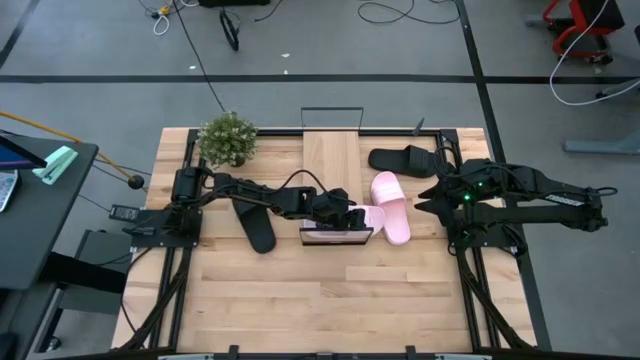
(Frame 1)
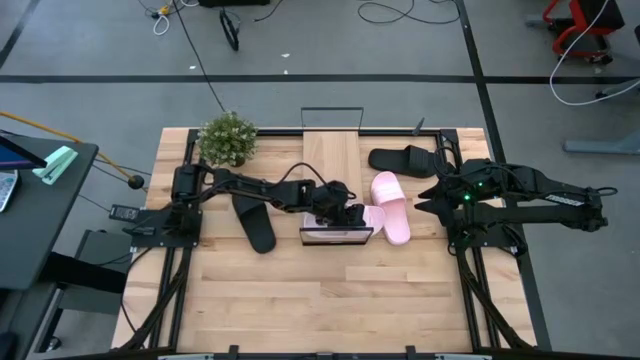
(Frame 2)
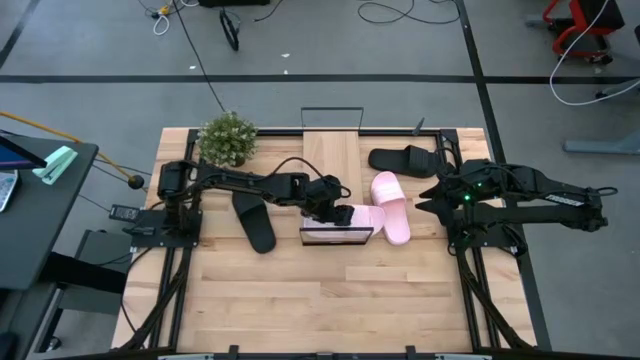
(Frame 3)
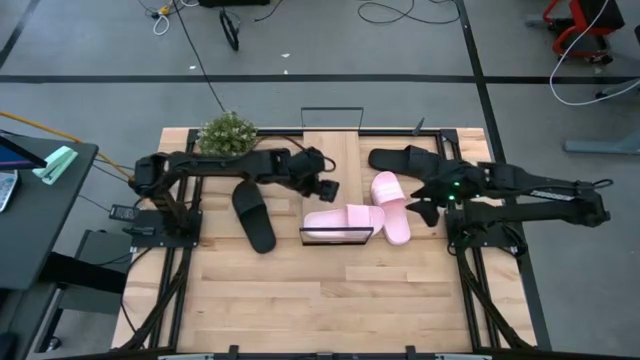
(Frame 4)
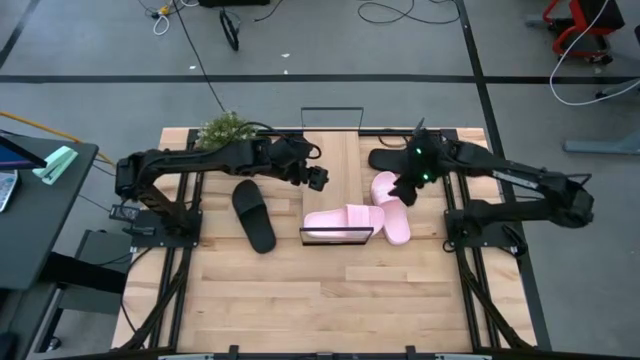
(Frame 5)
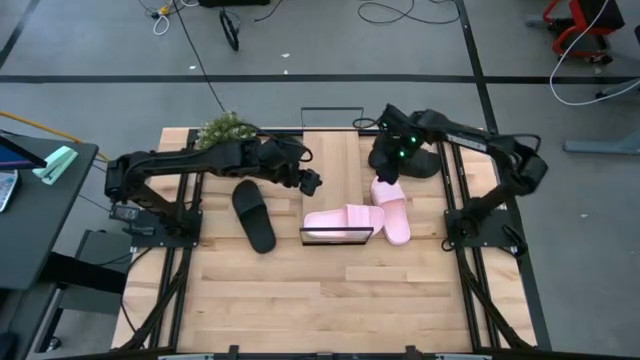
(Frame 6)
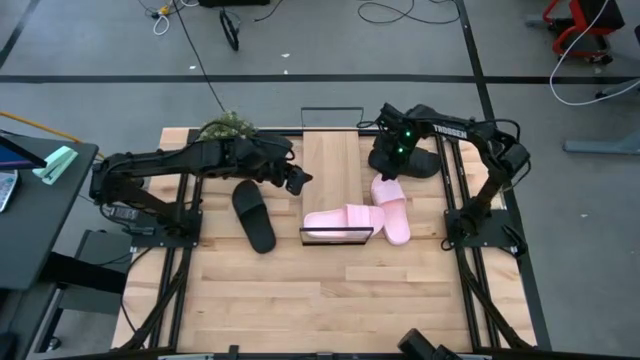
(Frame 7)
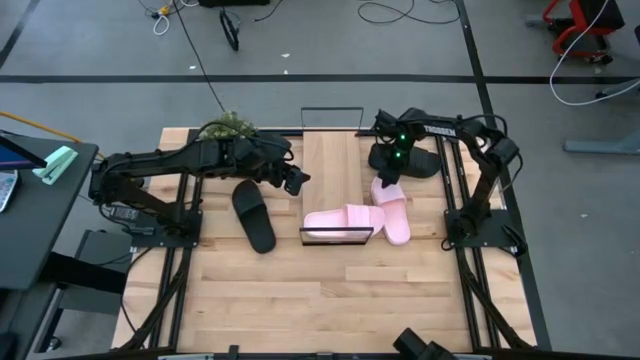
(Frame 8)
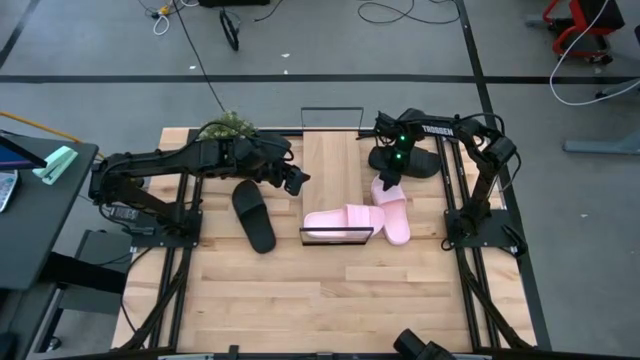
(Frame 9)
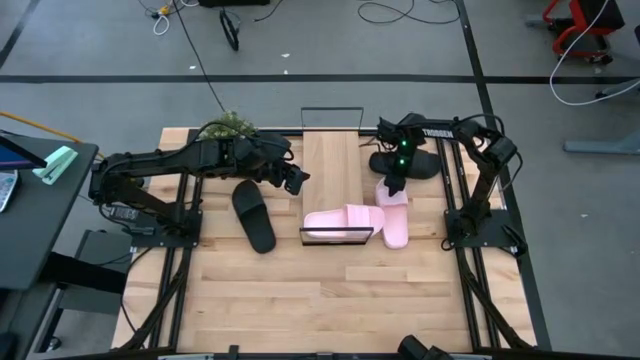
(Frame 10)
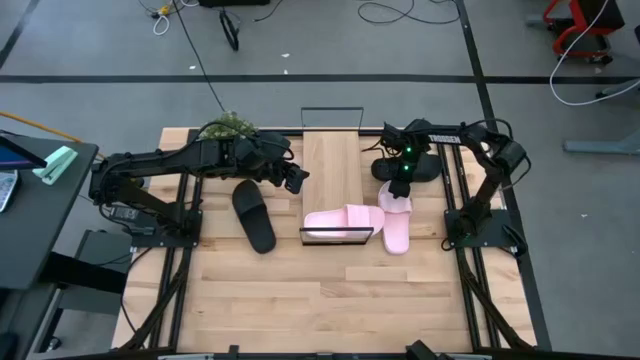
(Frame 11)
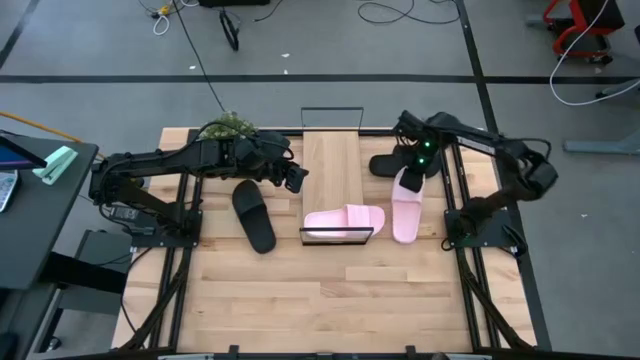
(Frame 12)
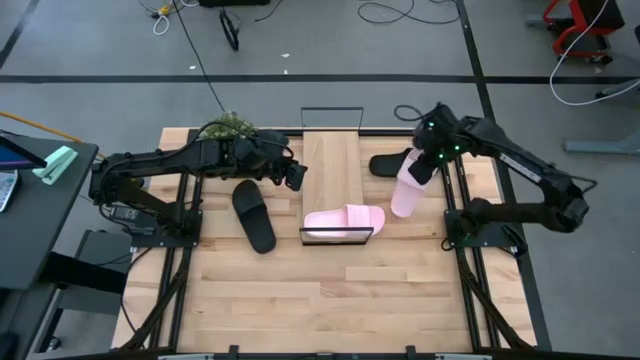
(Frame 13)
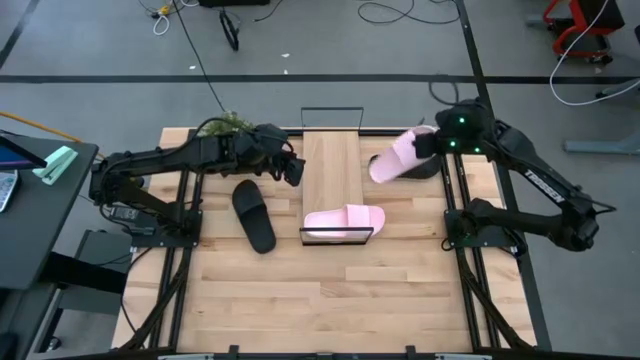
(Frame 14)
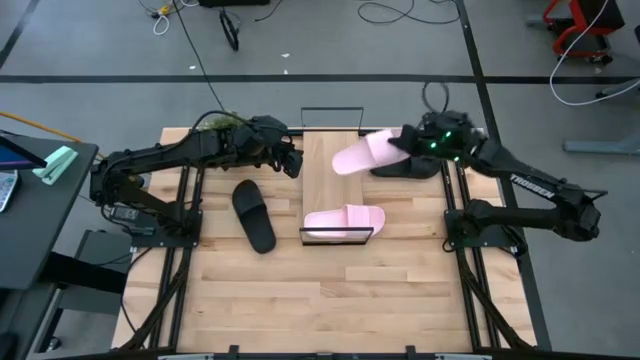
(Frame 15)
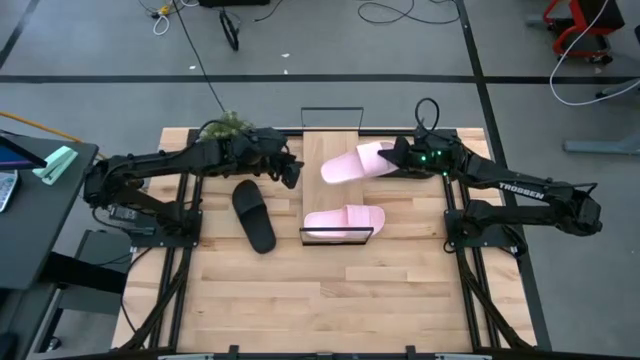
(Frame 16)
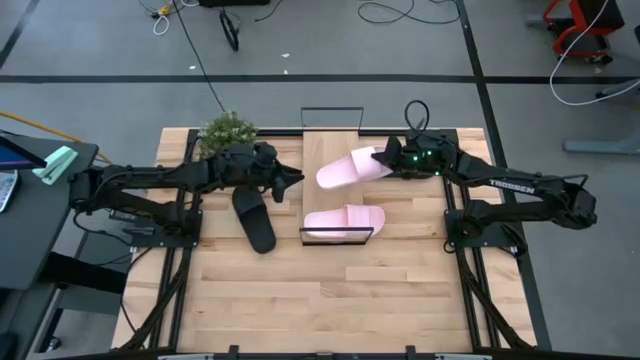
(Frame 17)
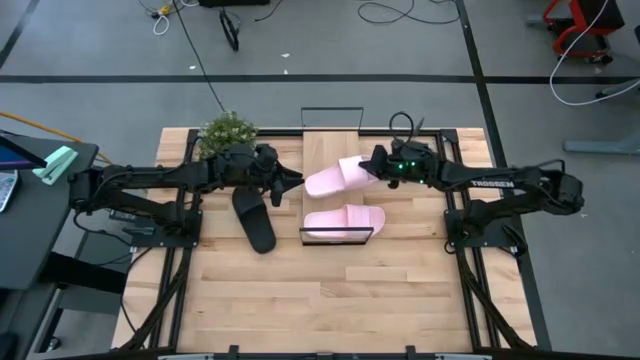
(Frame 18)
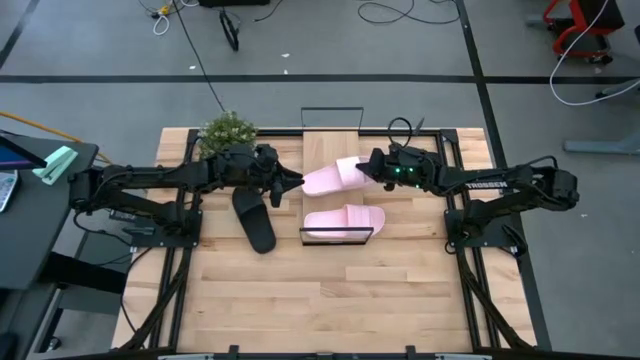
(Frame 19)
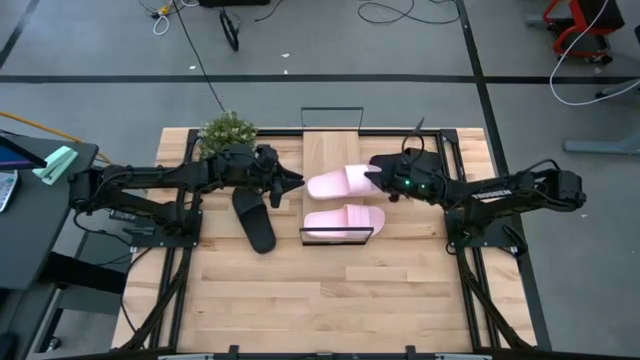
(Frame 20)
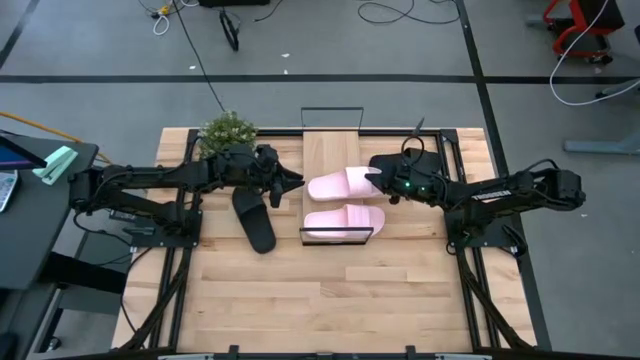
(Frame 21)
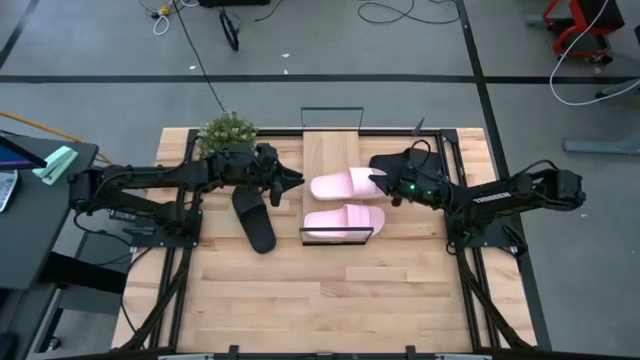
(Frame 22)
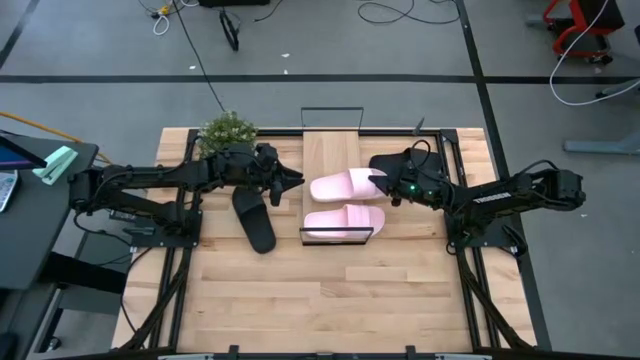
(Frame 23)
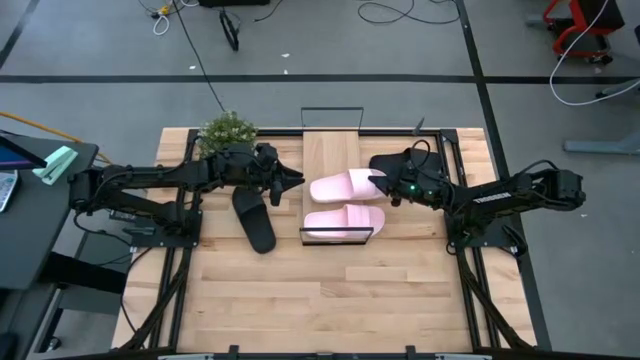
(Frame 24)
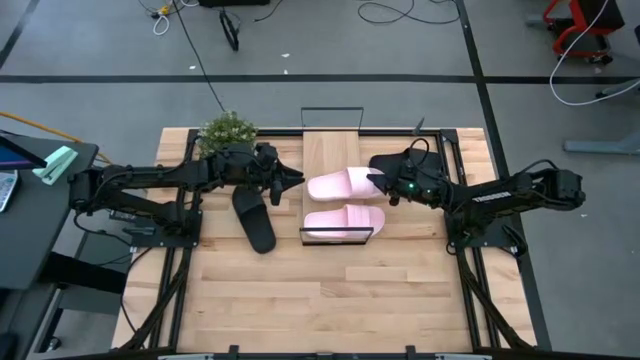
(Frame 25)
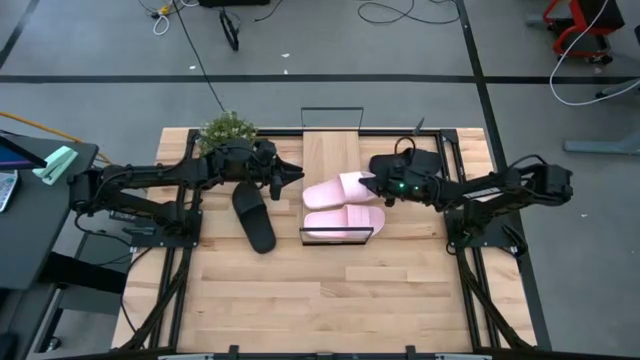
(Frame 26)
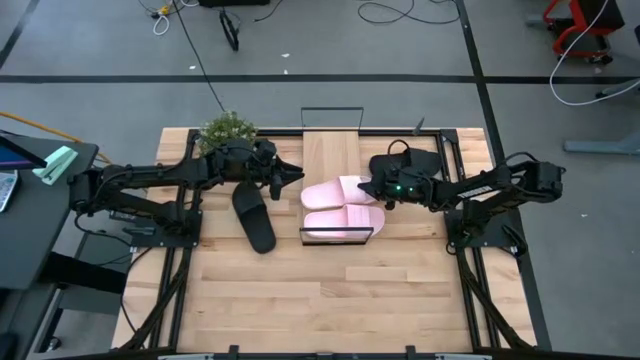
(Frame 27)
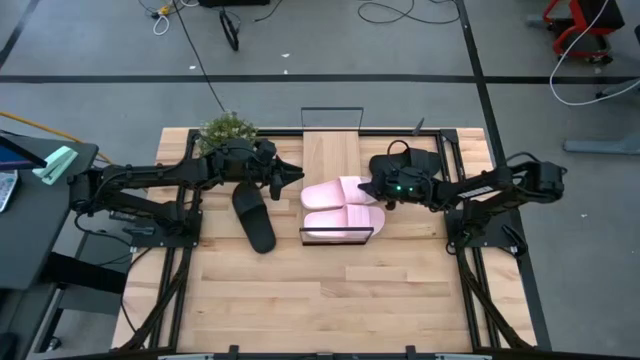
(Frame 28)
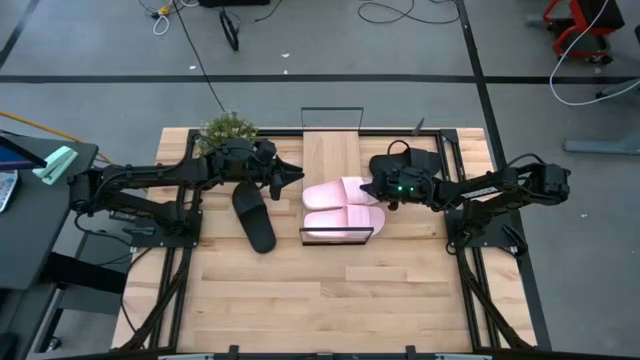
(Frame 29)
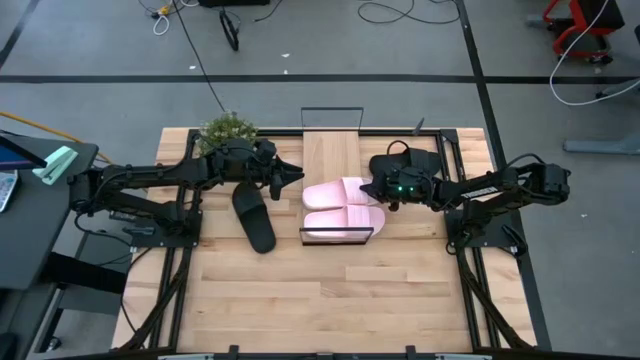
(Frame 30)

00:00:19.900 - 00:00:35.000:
Task: Pick and place slides into the shelf
Put the pink slides on the shelf

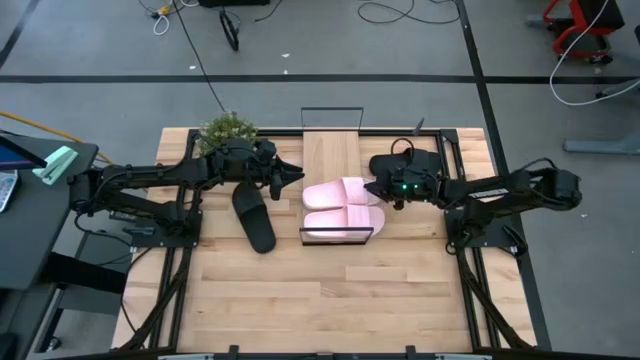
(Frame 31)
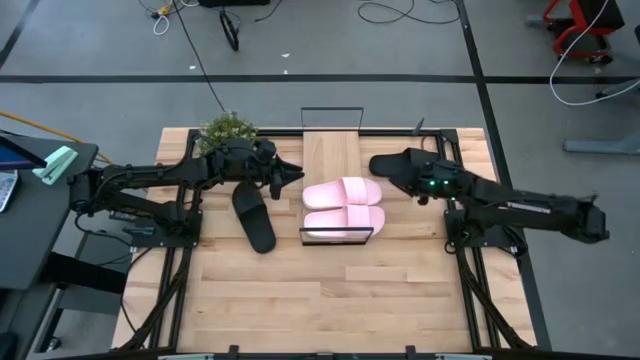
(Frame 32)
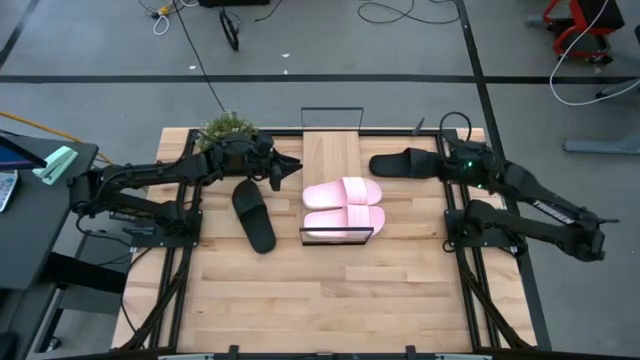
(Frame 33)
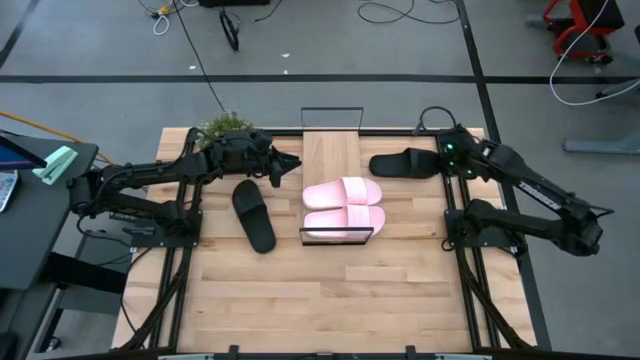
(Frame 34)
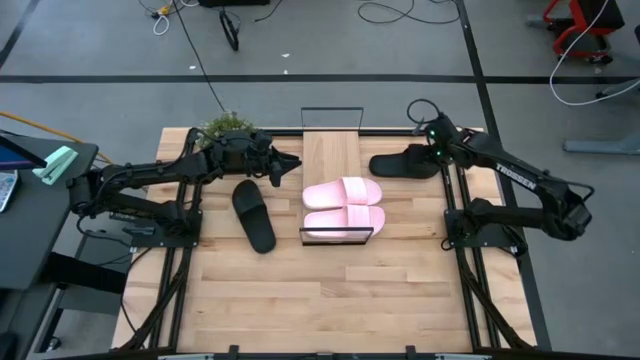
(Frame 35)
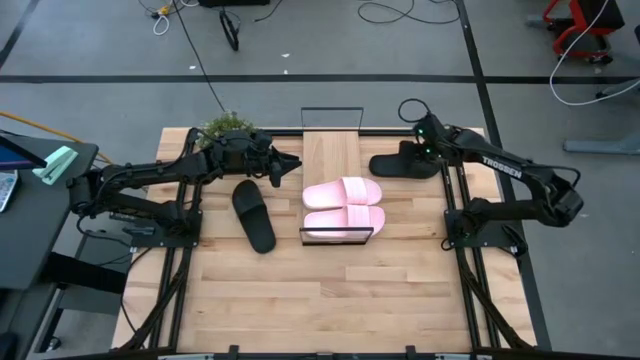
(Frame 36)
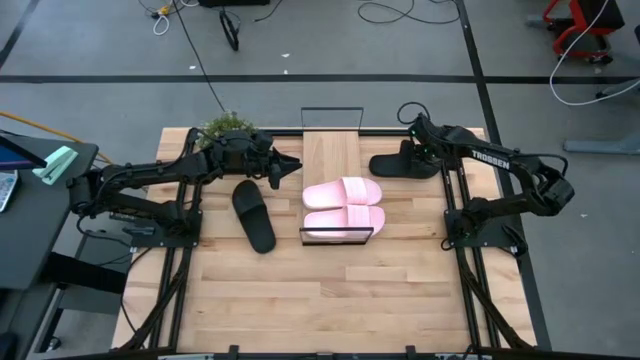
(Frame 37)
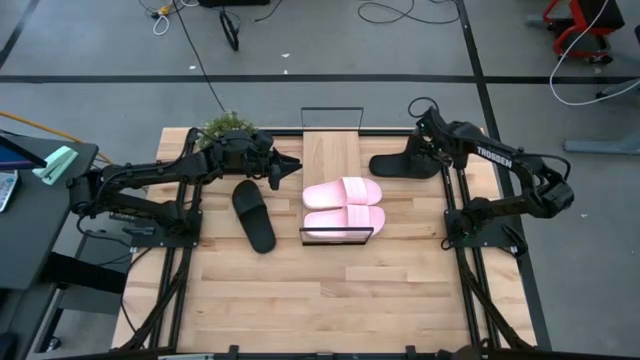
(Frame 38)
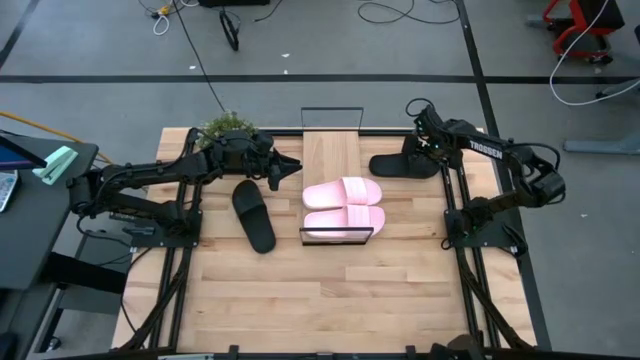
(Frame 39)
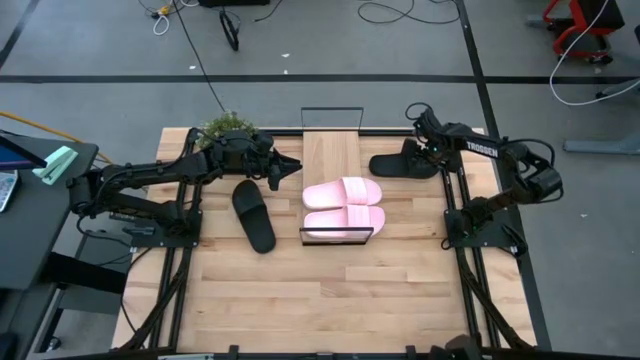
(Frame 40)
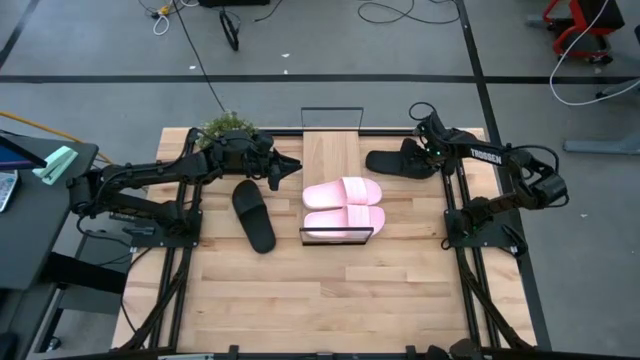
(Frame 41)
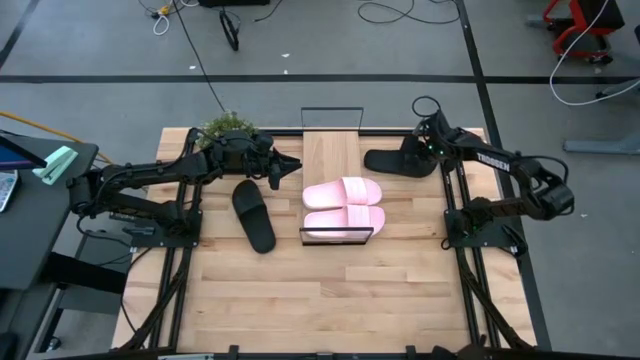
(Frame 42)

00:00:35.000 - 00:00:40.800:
Put the right black slides on the shelf
